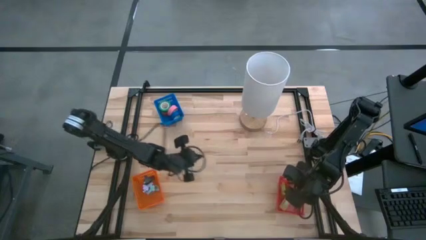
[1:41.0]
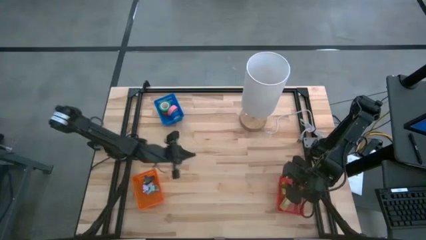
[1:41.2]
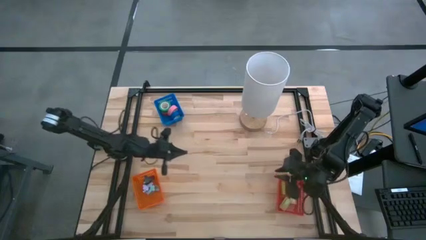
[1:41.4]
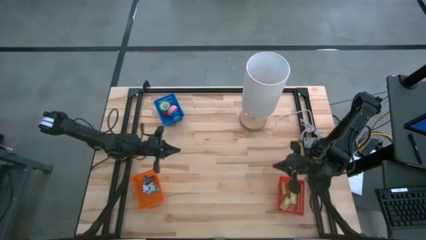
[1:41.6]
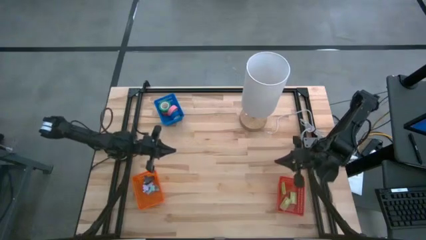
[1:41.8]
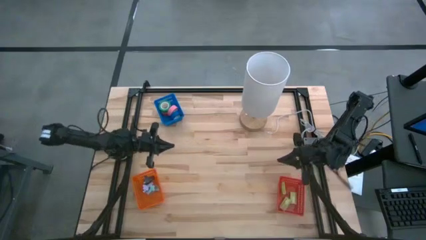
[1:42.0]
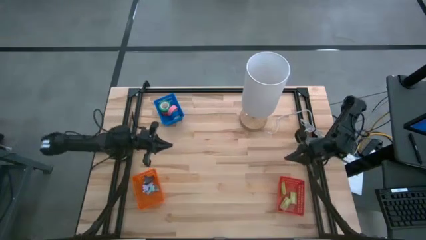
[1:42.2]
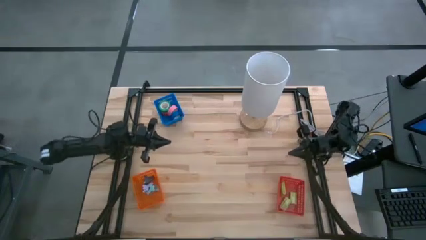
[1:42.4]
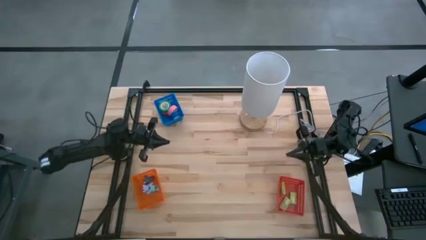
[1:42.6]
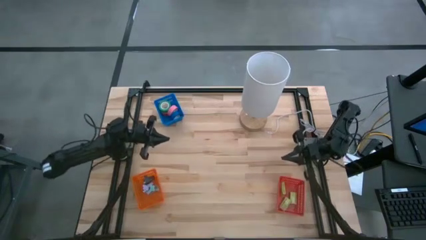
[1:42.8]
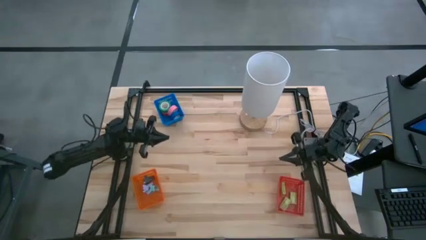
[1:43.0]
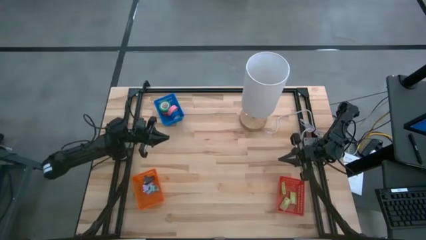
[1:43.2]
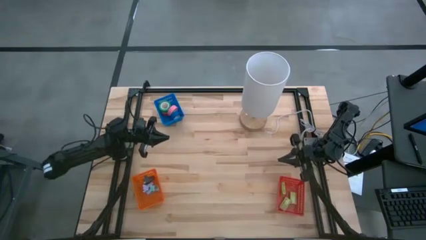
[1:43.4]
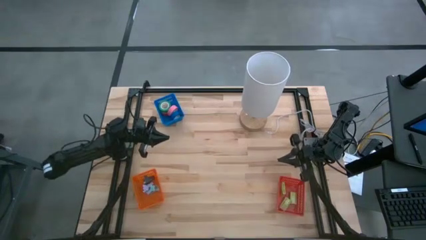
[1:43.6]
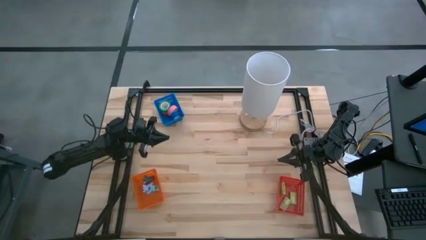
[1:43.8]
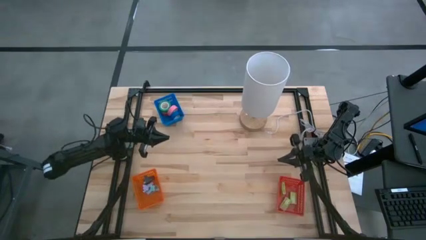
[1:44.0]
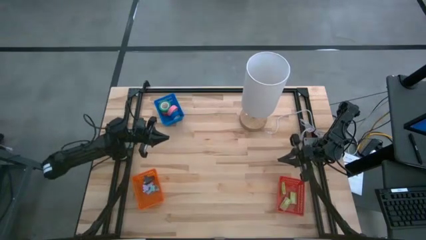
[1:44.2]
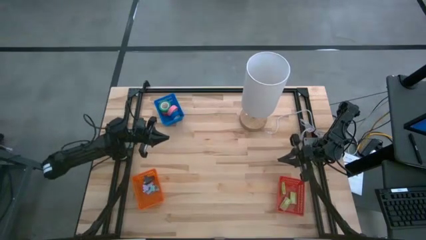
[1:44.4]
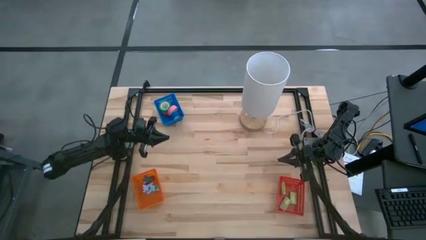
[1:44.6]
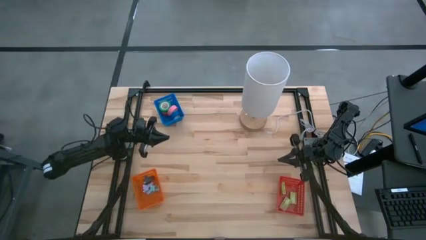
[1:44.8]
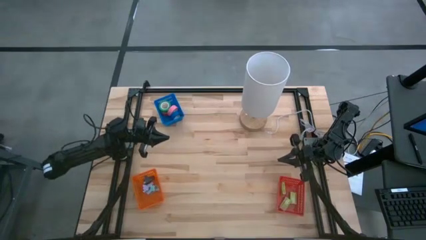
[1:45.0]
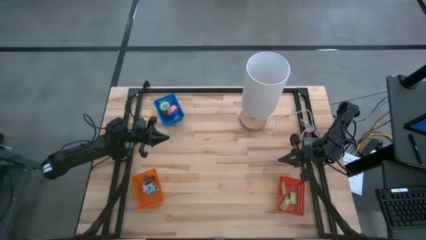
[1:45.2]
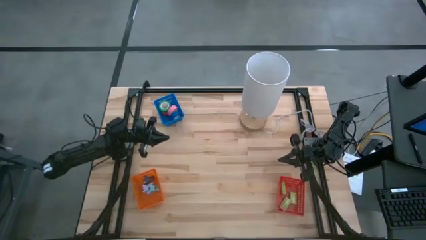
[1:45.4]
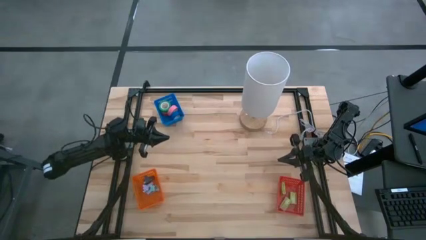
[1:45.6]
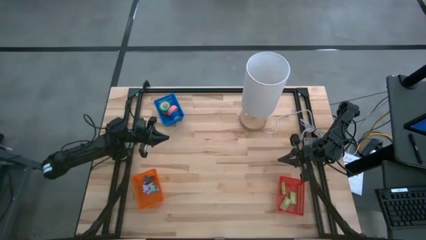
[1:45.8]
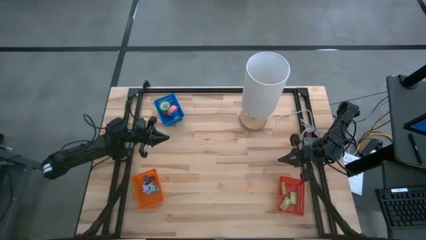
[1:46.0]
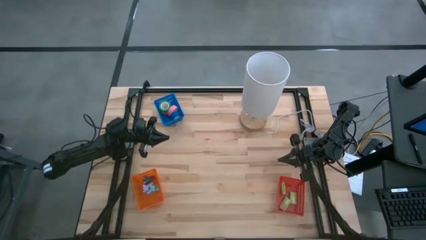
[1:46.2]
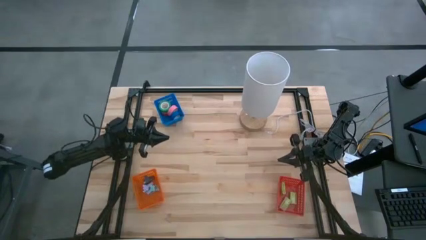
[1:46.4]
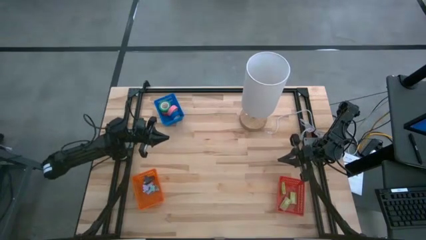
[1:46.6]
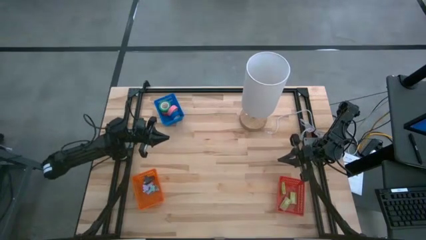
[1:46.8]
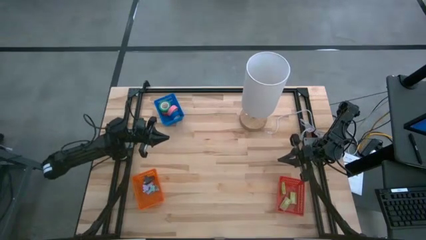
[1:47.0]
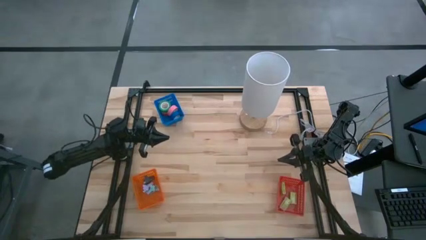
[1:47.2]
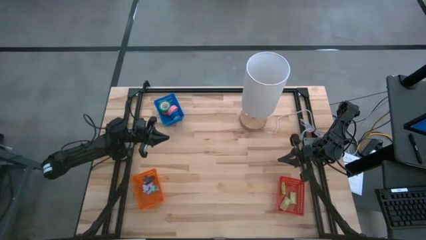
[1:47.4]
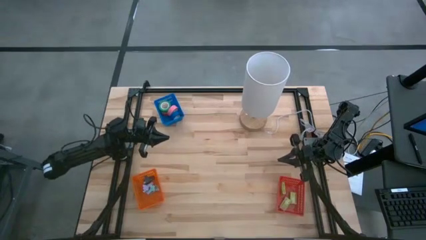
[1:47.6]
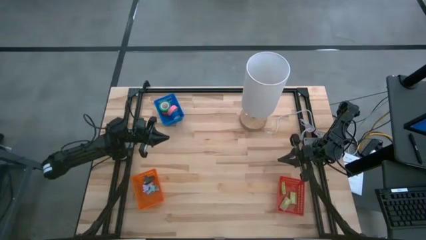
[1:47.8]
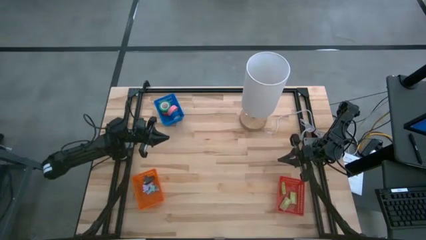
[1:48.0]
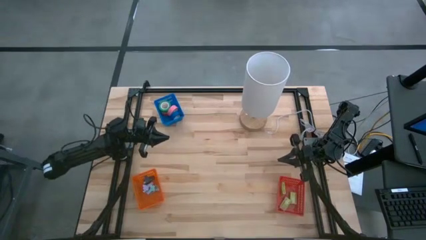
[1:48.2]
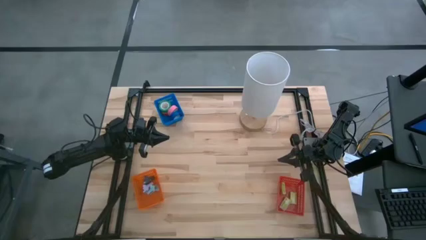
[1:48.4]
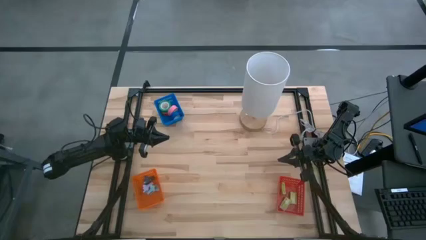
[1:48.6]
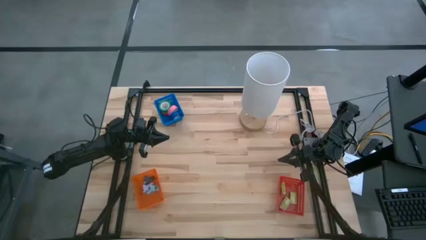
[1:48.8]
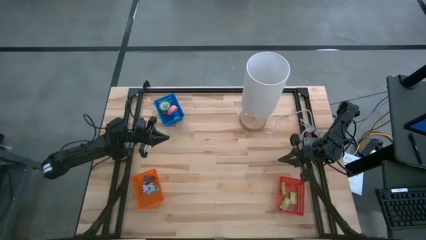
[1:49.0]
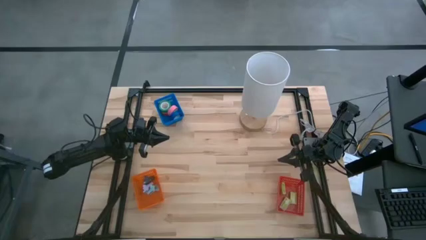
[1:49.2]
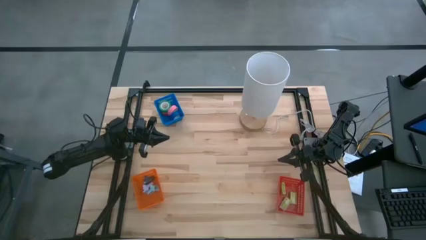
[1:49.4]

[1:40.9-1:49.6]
Task: Pick and place Stapler, Stapler remover, tape
Return to Home Position

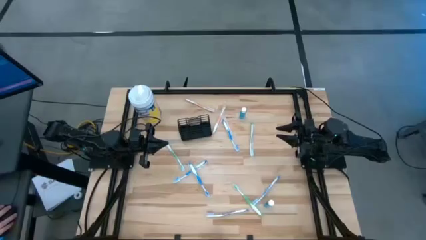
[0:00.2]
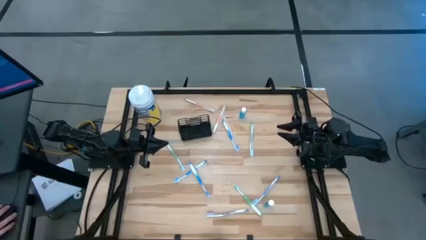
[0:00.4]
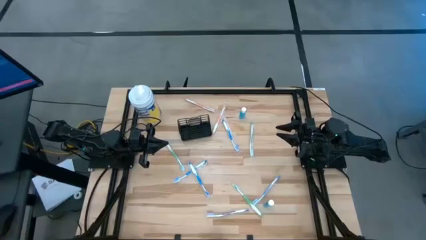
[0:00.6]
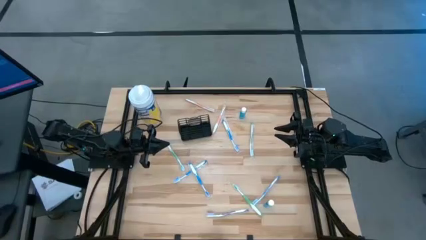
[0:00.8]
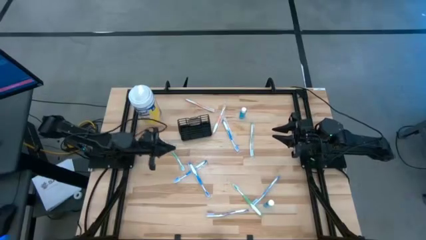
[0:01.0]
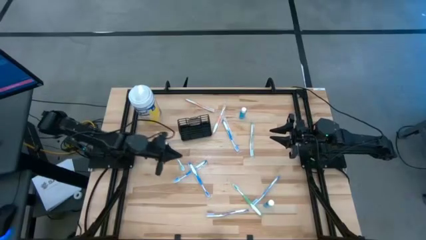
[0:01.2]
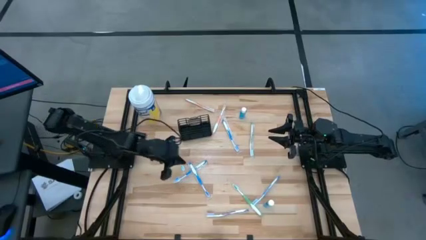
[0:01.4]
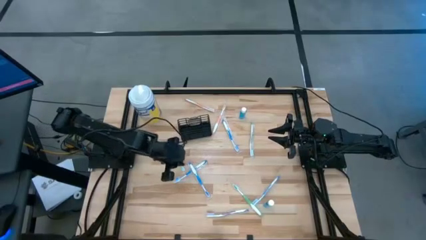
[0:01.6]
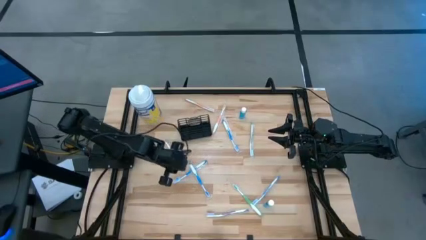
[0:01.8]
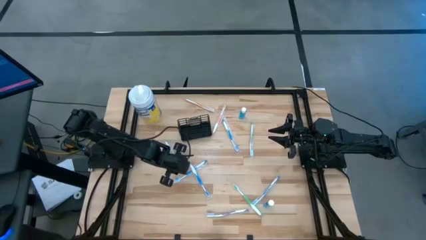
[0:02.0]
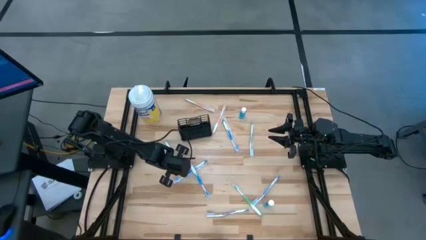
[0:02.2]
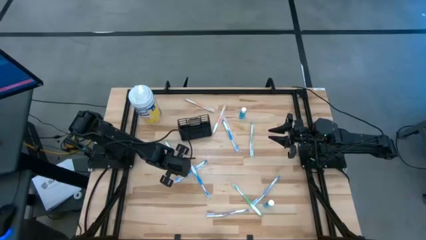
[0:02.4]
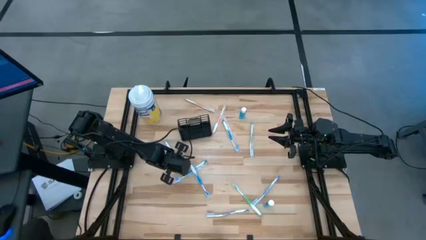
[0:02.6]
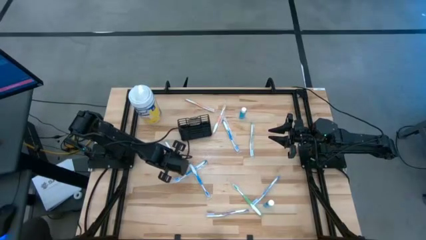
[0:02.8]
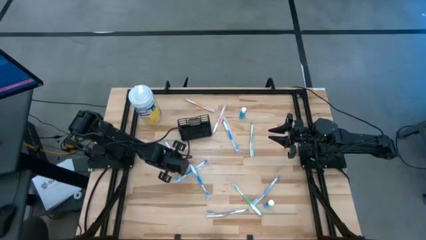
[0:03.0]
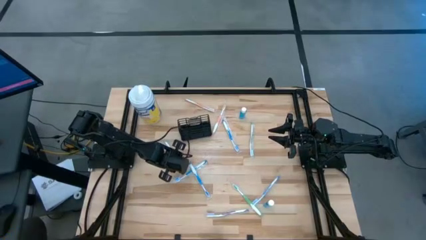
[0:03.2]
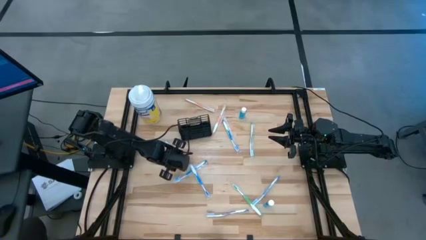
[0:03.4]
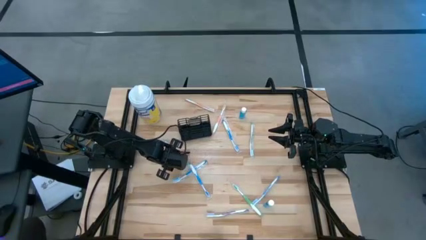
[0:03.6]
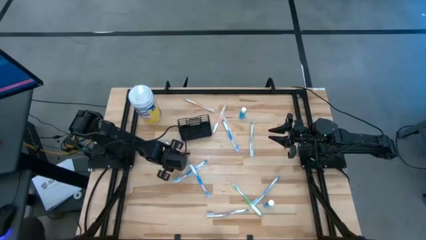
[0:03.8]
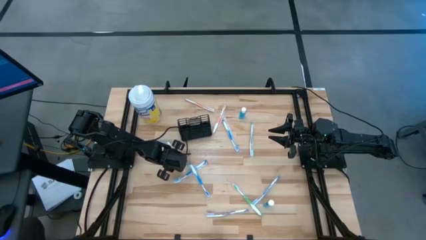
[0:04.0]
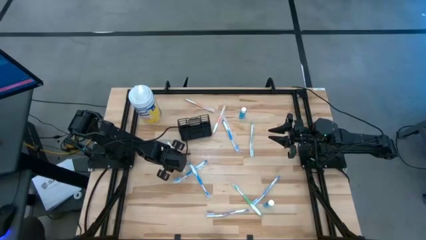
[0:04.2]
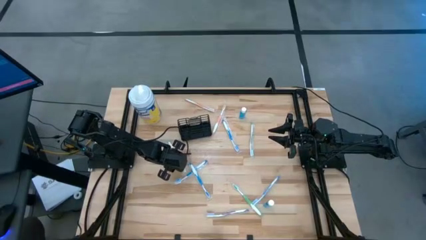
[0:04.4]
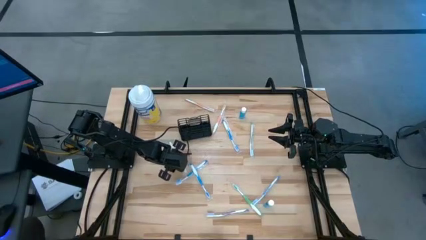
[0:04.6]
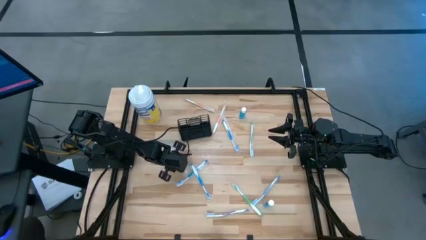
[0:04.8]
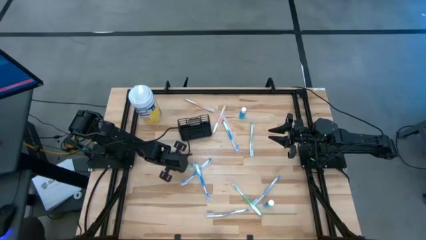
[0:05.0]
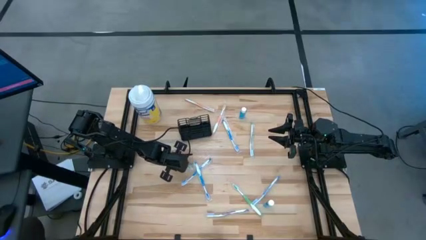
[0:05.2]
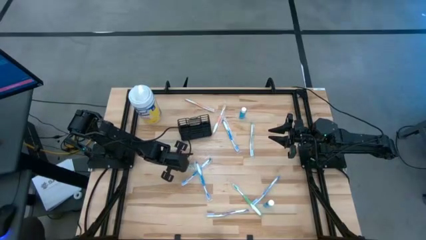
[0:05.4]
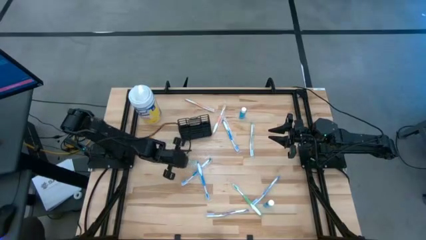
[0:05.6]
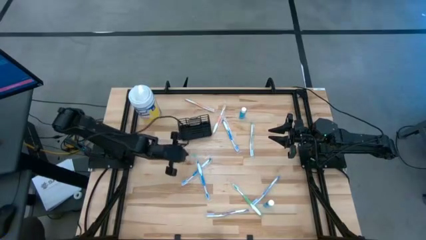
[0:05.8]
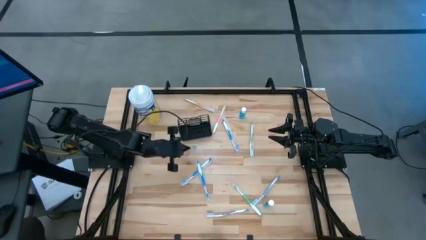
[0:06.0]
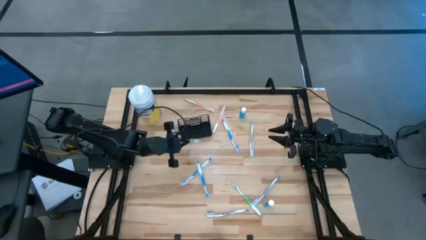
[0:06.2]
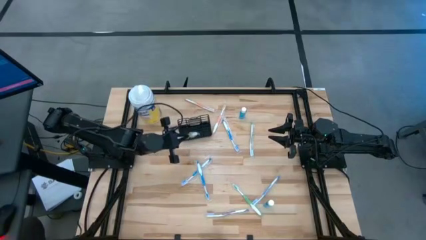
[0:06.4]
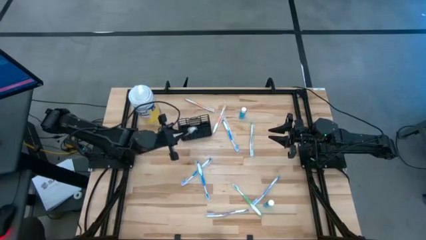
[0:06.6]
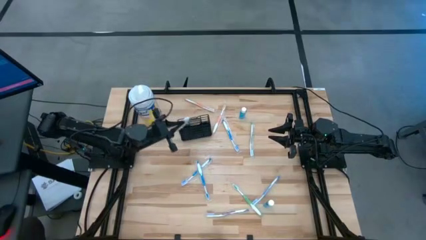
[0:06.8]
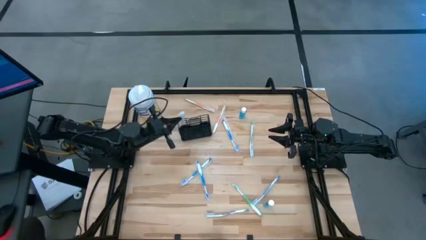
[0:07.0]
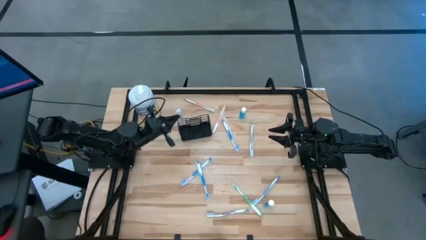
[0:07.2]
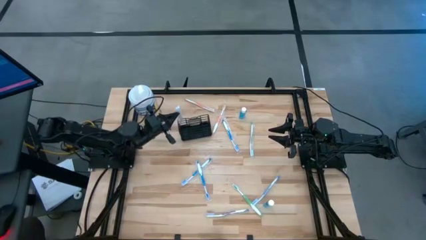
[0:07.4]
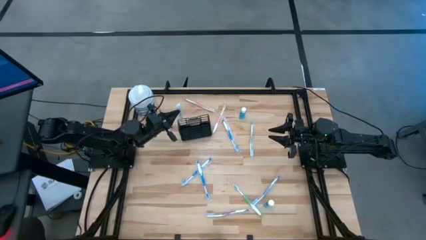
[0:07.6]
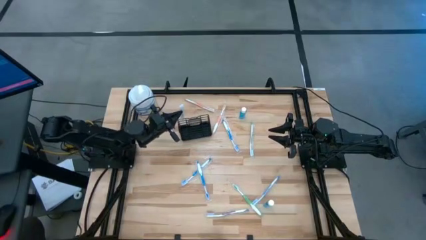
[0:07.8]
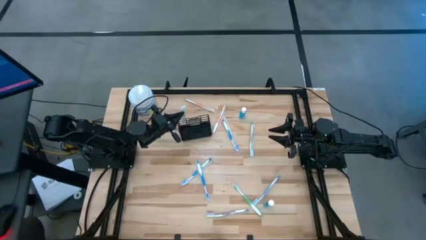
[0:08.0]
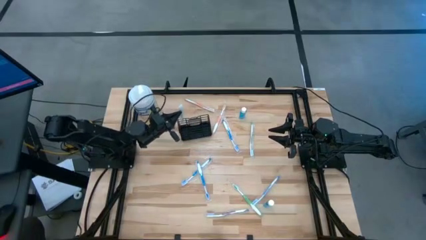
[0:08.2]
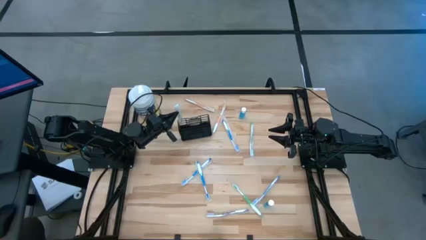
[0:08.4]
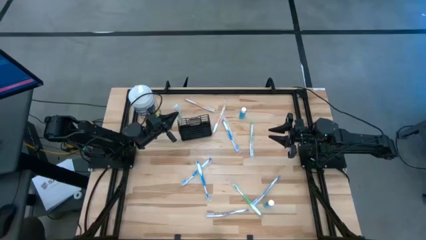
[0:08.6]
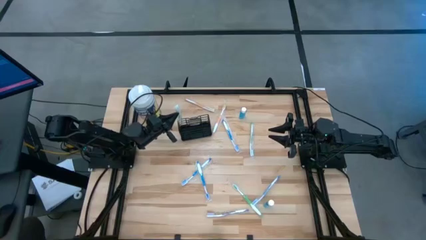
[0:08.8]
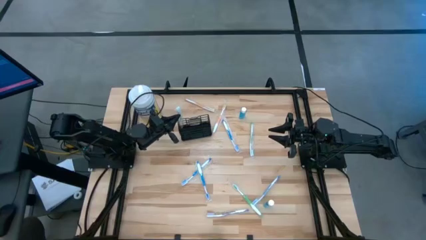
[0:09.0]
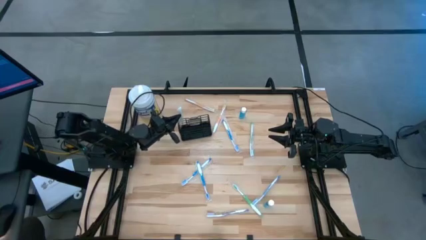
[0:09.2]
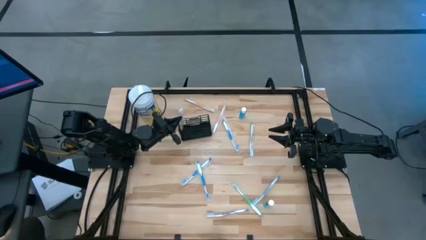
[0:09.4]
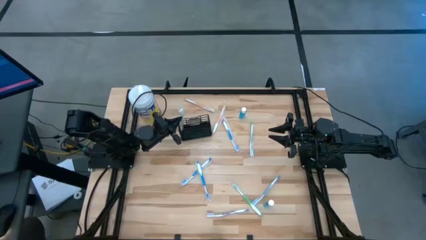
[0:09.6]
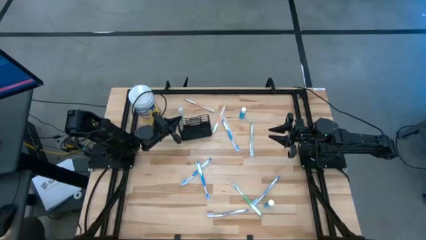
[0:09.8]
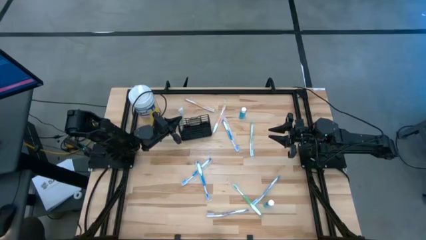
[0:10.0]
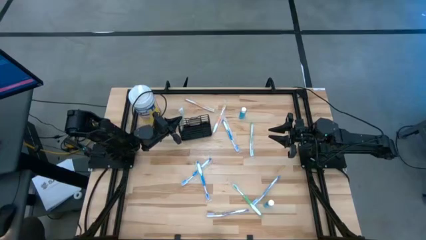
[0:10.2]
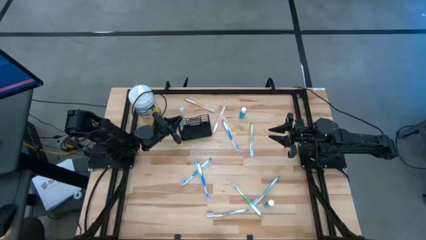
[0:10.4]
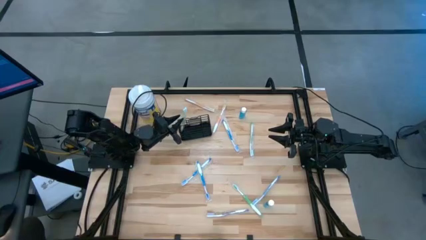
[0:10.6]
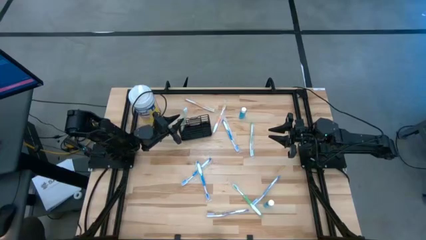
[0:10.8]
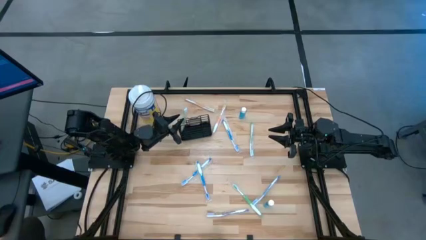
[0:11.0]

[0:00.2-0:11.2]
Task: Pick & Place toothbrushing station
Put the left green toothbrush into the mesh organizer
